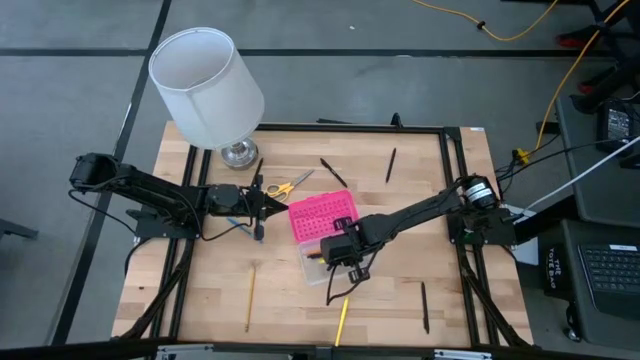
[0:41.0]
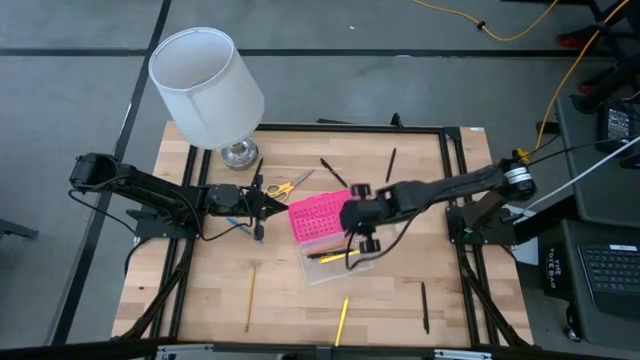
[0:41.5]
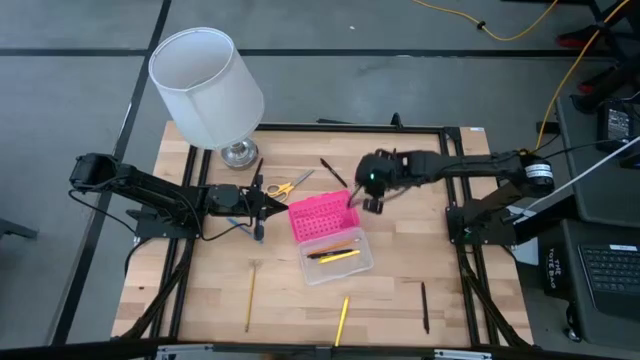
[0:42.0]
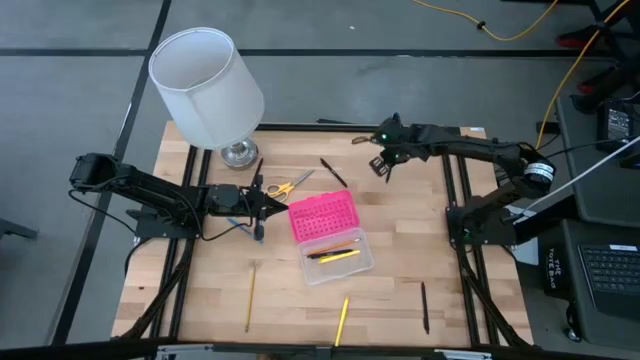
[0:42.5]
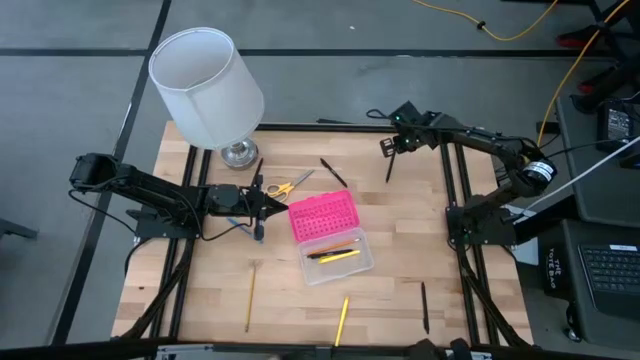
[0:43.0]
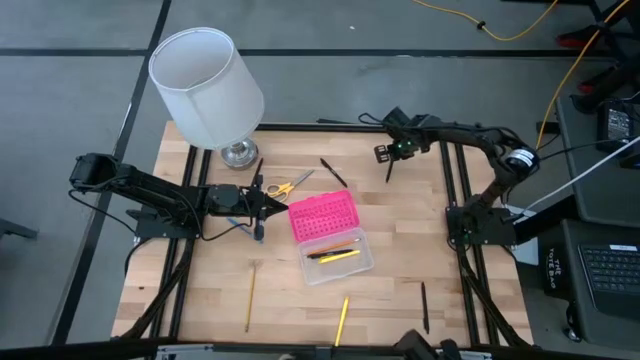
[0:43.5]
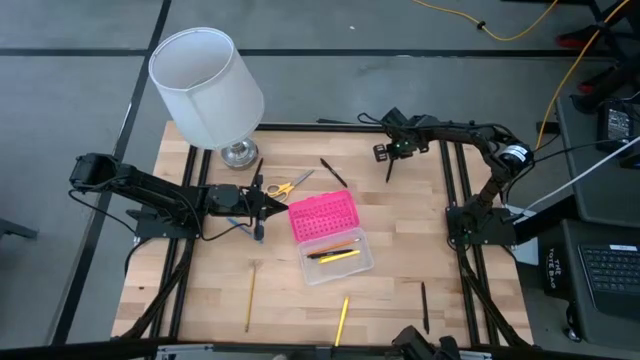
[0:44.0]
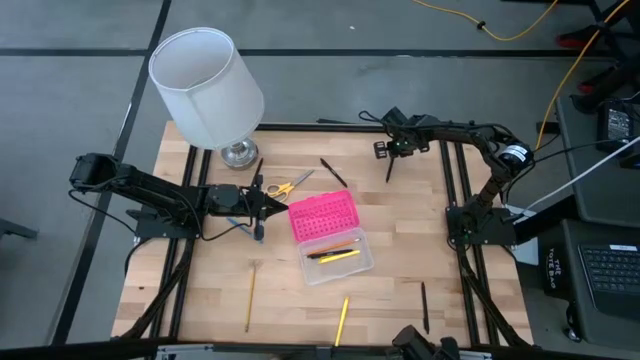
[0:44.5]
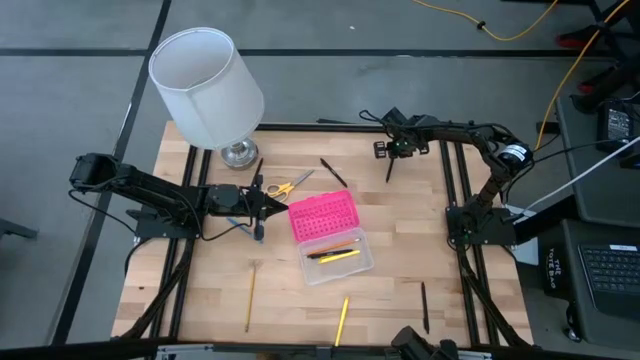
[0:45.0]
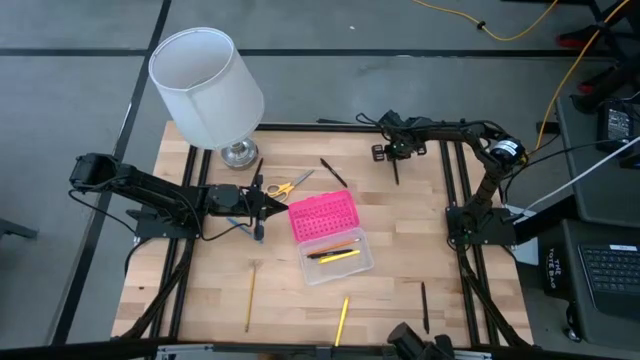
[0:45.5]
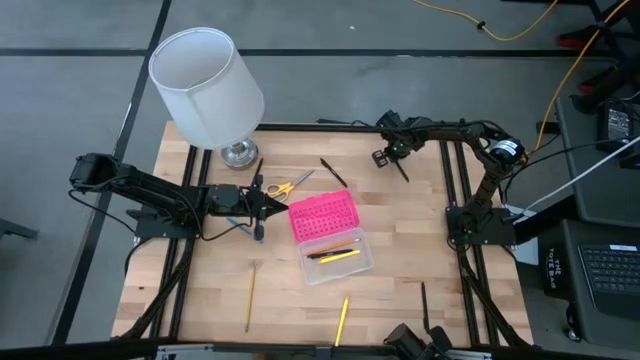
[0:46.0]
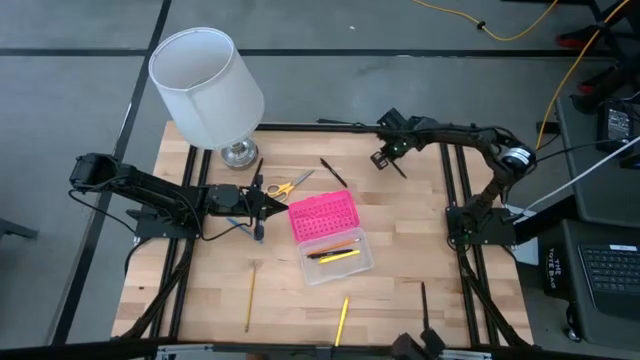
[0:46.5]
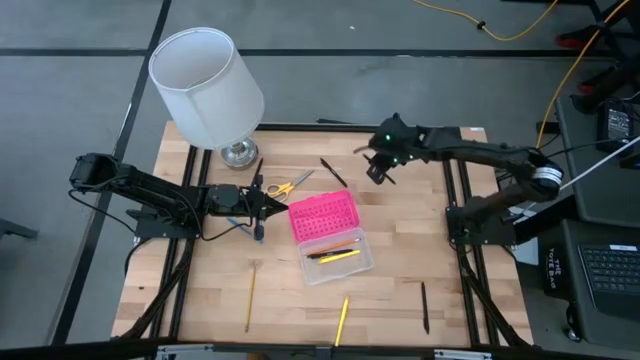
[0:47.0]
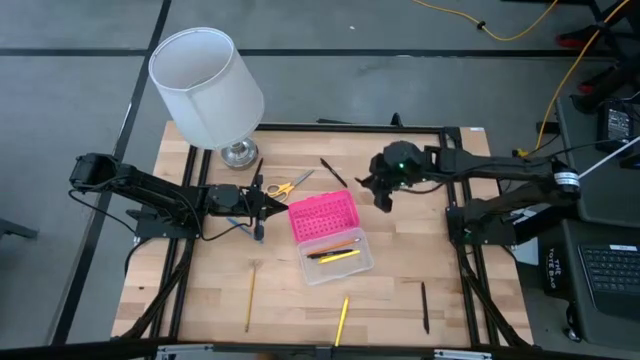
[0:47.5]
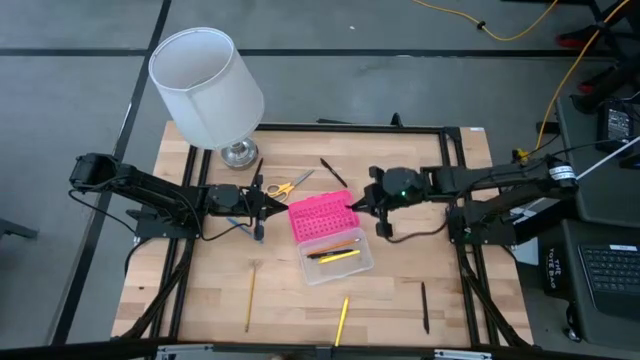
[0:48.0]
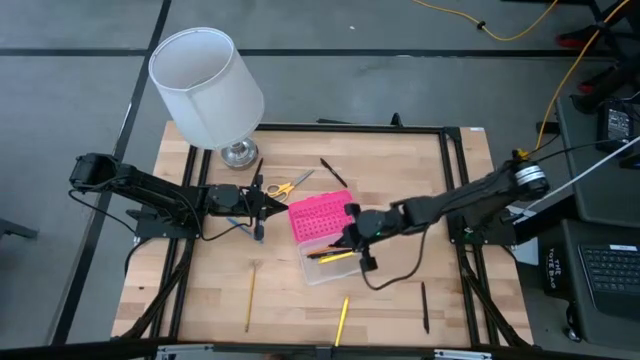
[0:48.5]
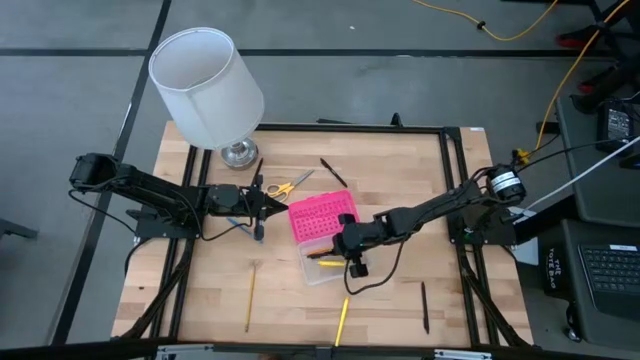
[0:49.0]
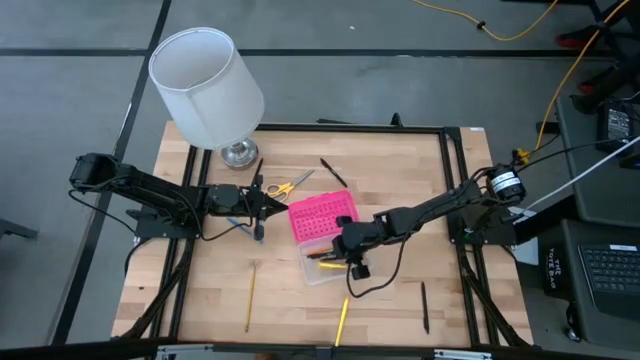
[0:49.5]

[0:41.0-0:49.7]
Task: Pick & place school supplies into a supply box
Put the black pen into the pink supply box

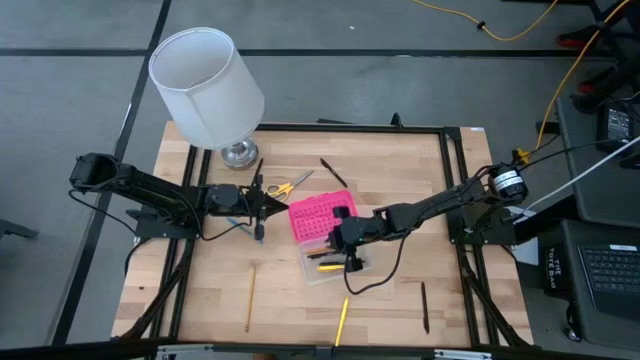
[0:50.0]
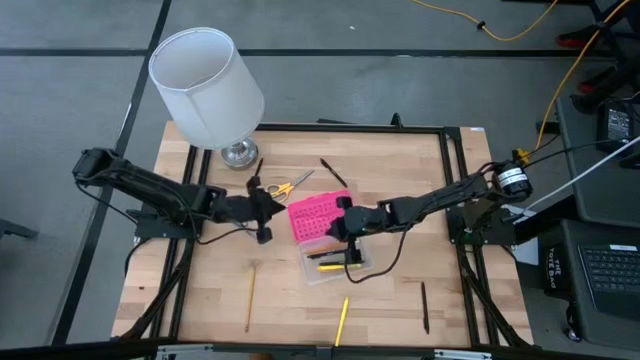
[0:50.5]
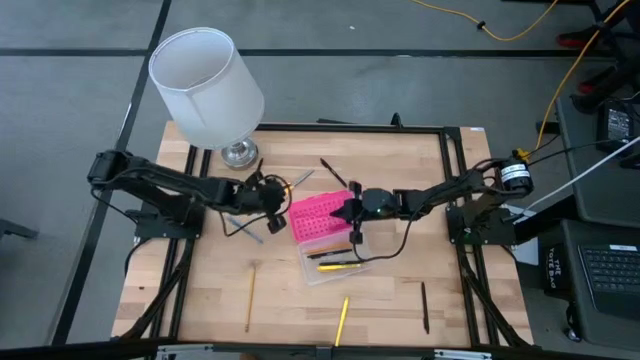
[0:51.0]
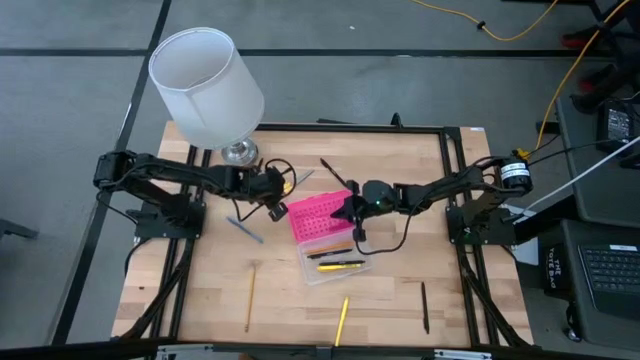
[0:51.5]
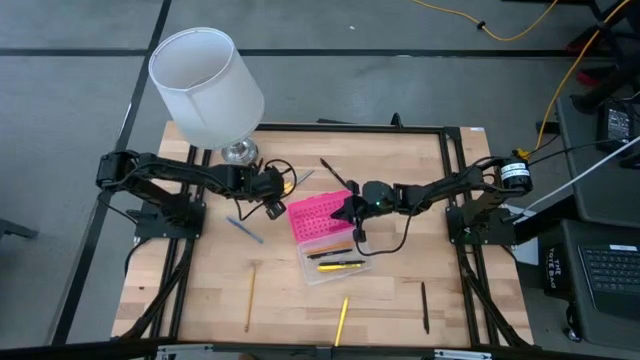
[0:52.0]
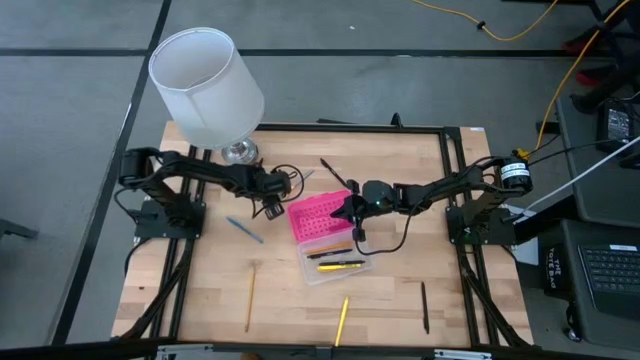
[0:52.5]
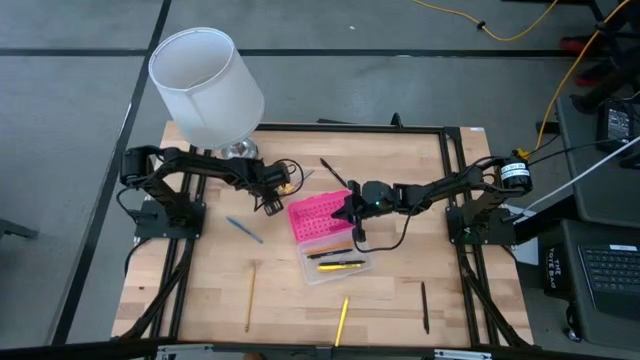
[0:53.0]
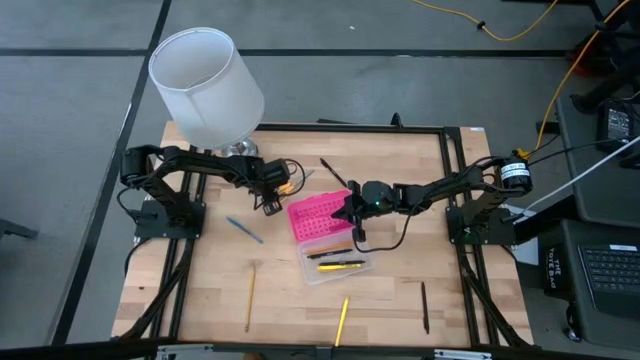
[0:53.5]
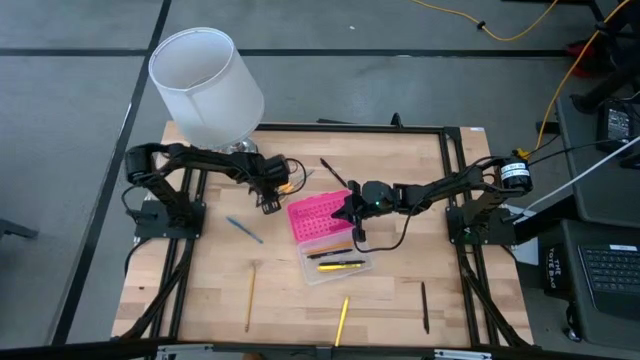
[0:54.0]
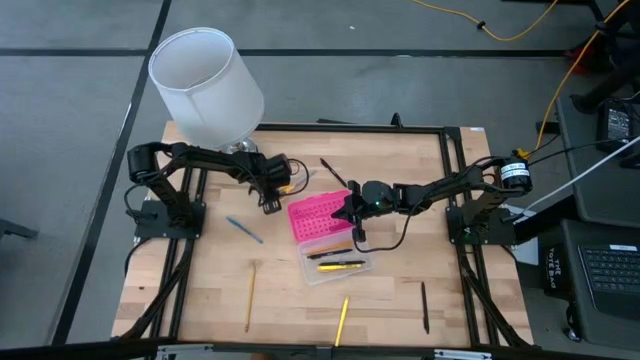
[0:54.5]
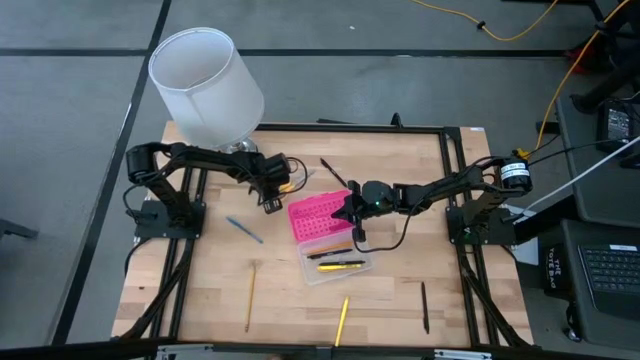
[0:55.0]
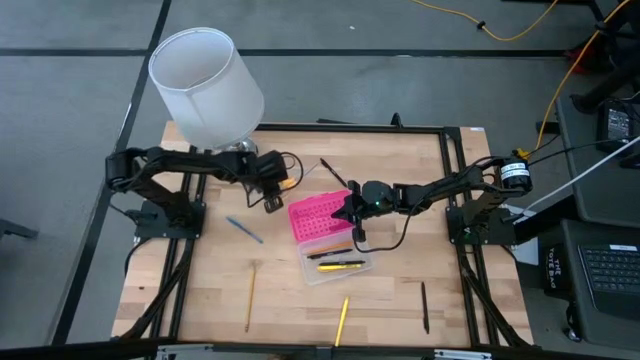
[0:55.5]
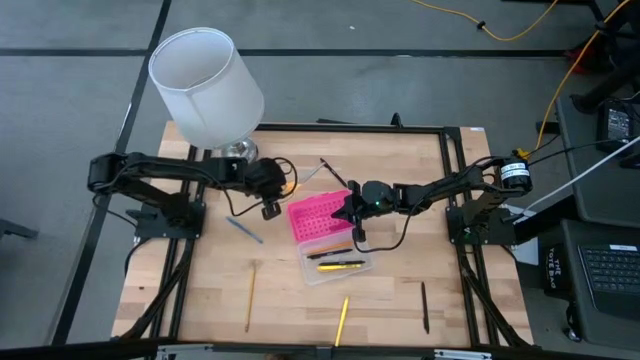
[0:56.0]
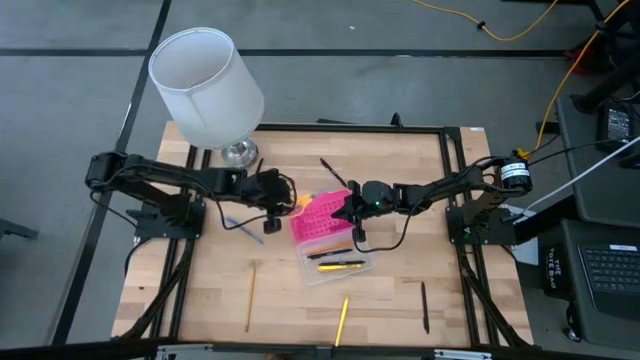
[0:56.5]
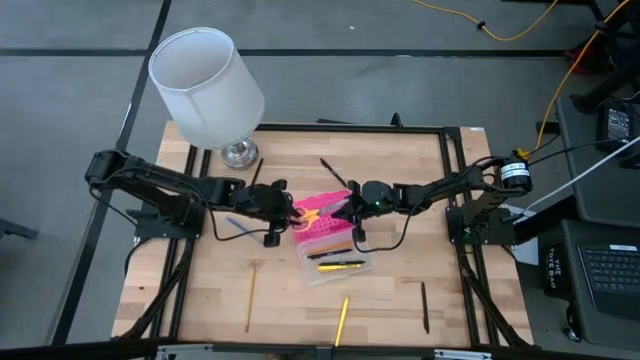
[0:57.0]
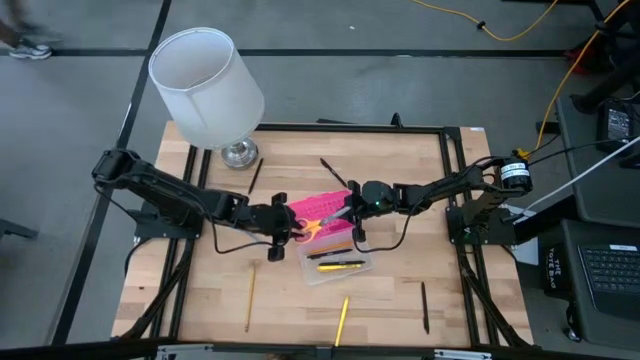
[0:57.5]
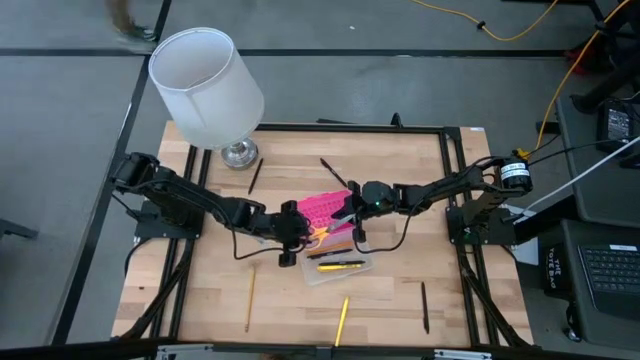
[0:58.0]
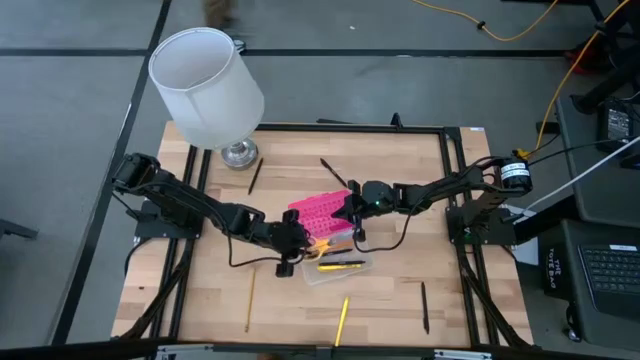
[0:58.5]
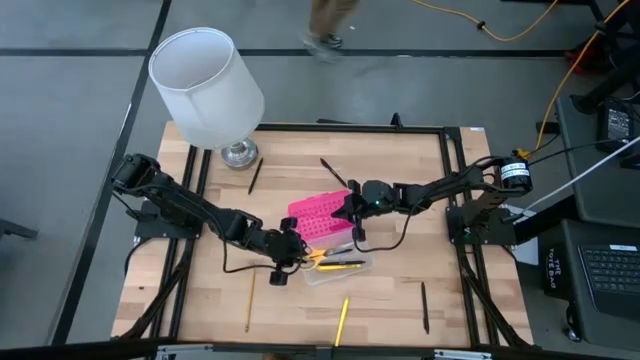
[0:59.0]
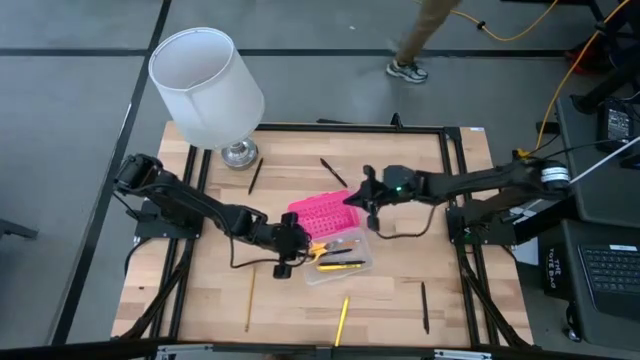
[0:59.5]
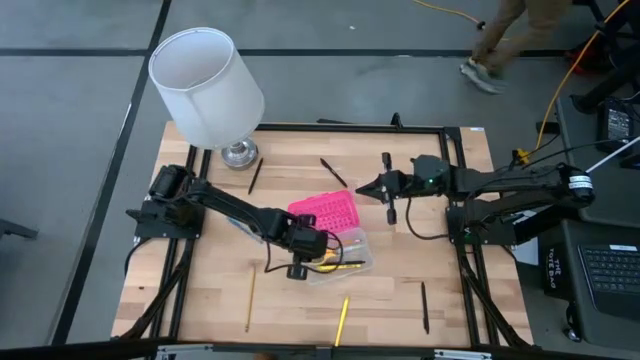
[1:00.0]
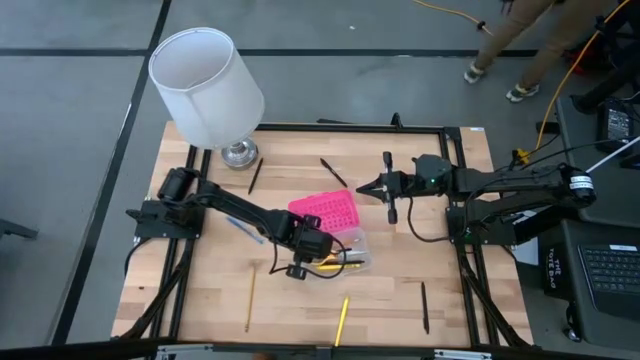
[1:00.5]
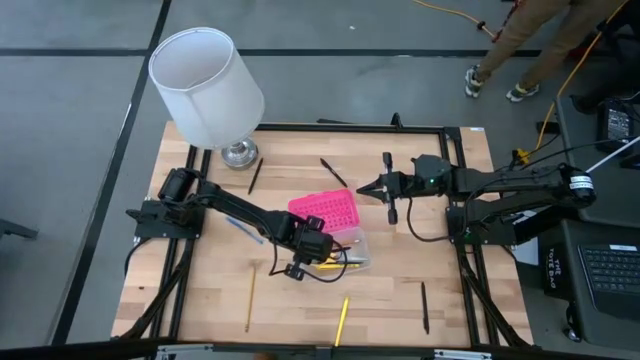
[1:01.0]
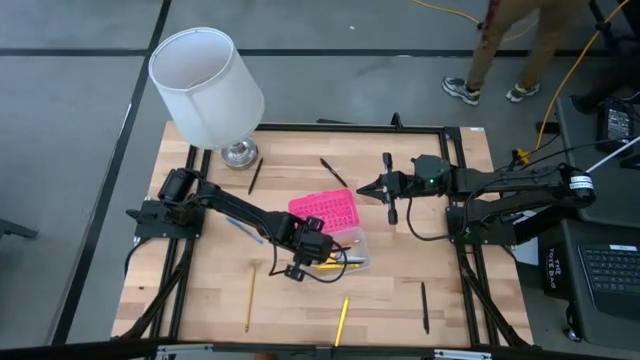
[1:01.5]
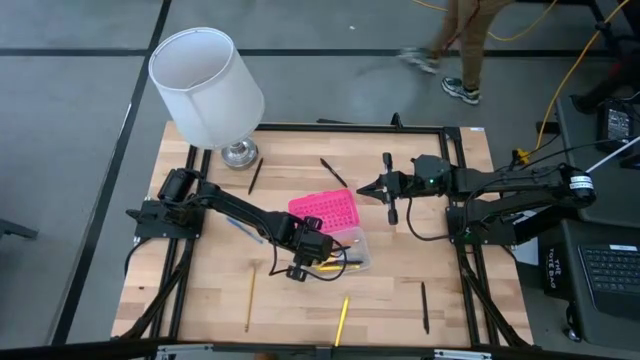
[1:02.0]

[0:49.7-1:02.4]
Put the yellow scissors into the pink supply box
